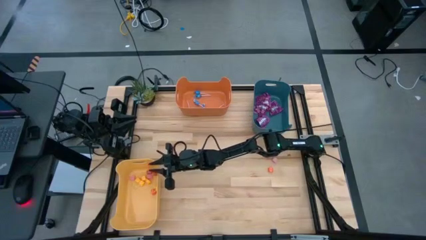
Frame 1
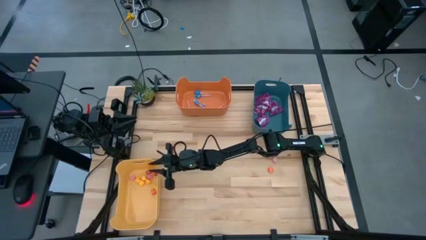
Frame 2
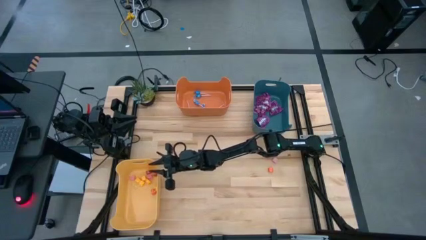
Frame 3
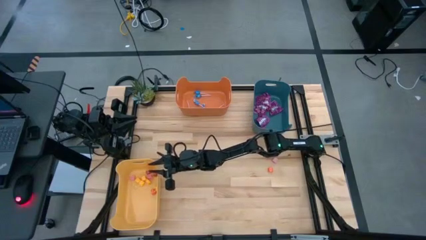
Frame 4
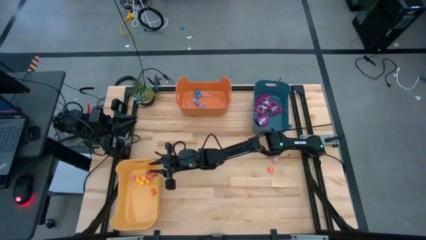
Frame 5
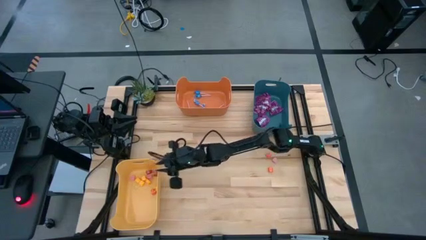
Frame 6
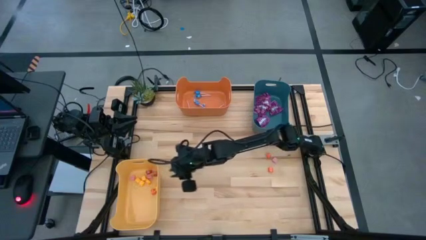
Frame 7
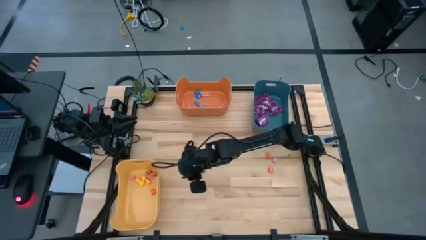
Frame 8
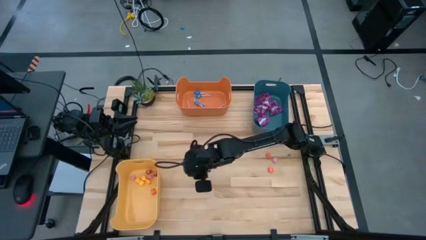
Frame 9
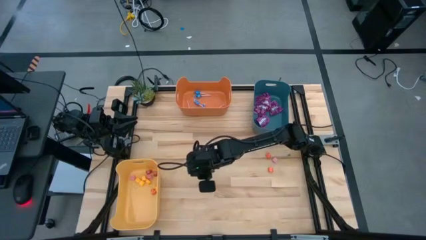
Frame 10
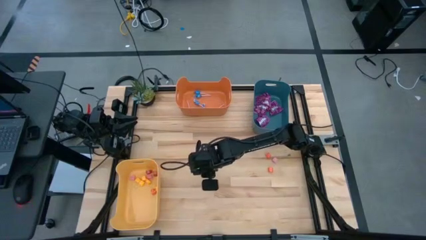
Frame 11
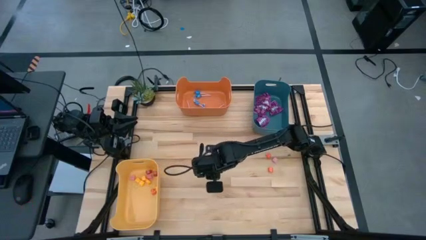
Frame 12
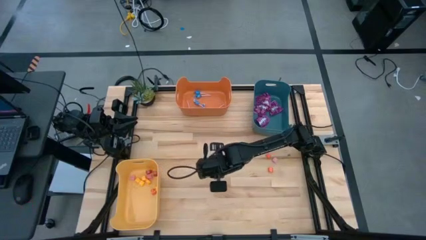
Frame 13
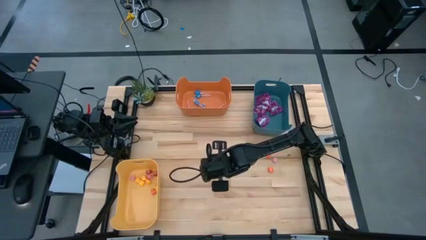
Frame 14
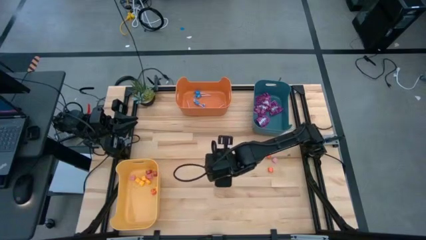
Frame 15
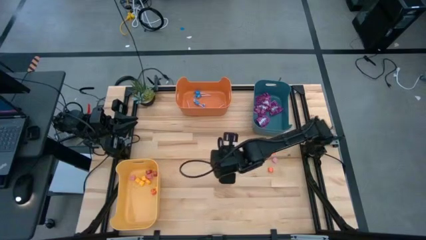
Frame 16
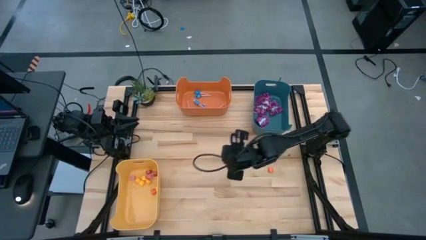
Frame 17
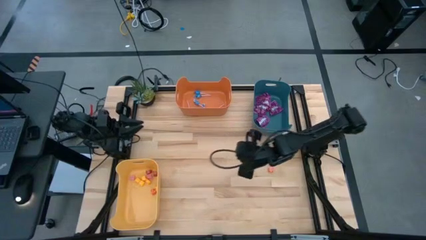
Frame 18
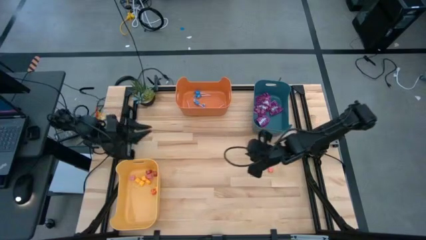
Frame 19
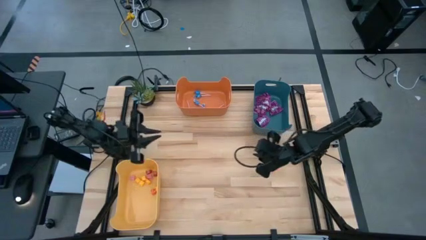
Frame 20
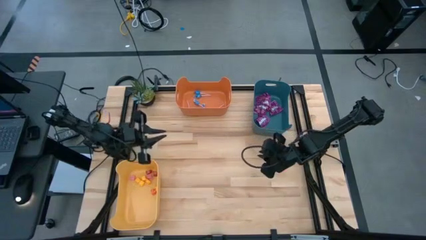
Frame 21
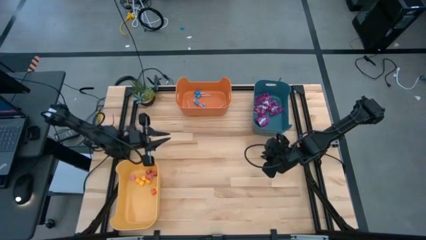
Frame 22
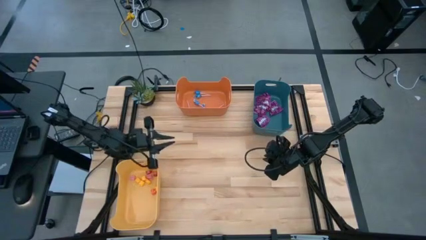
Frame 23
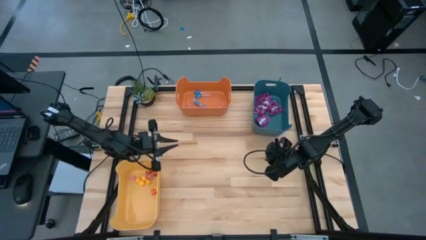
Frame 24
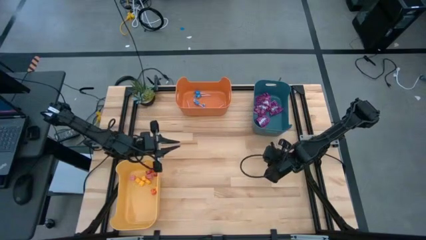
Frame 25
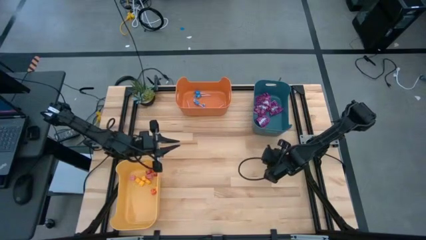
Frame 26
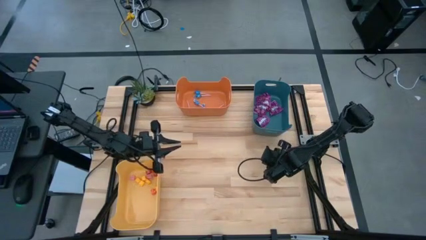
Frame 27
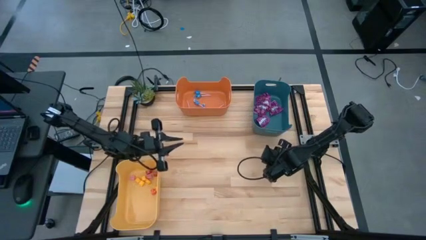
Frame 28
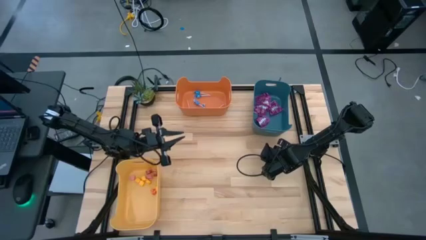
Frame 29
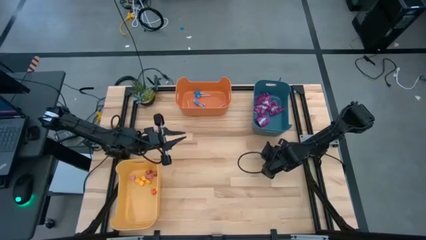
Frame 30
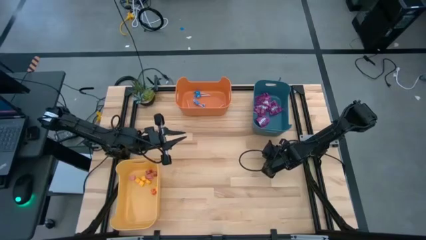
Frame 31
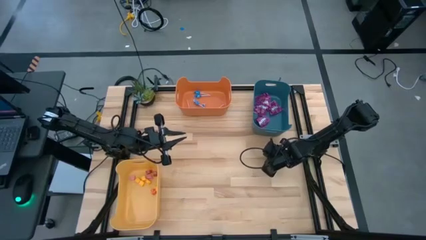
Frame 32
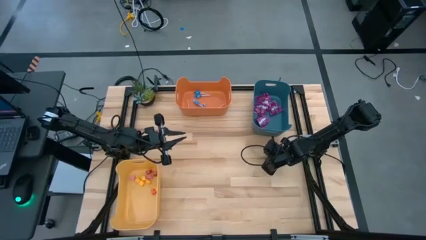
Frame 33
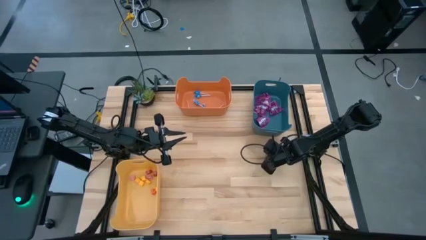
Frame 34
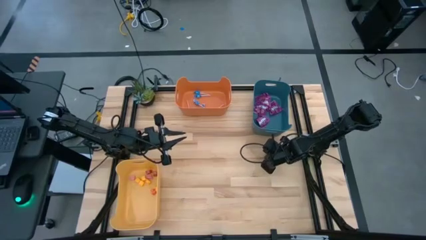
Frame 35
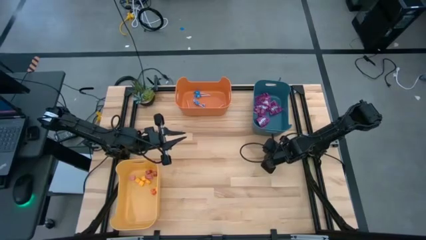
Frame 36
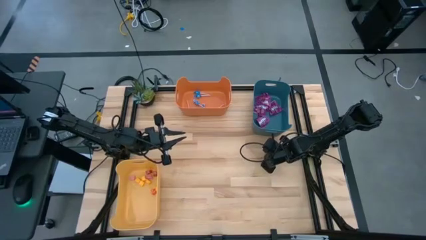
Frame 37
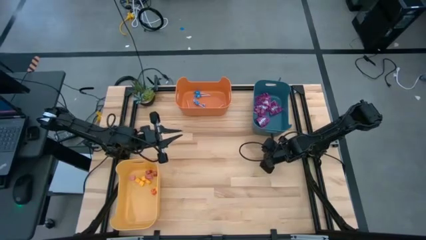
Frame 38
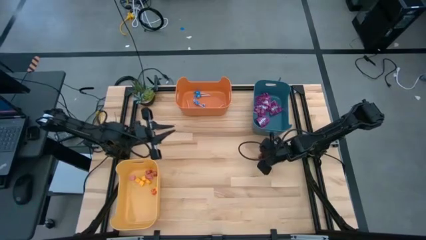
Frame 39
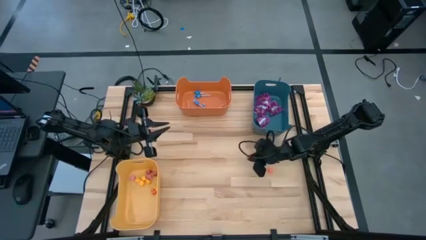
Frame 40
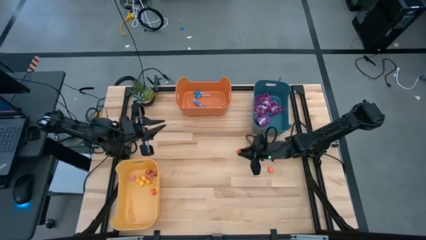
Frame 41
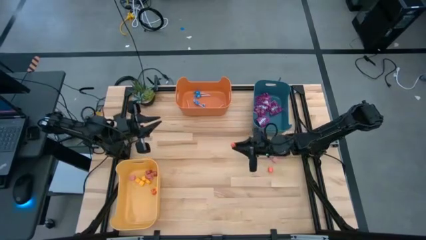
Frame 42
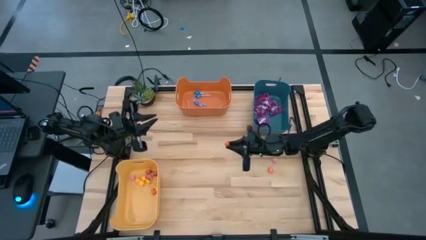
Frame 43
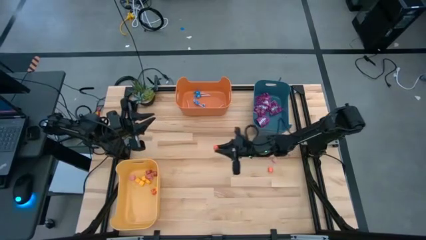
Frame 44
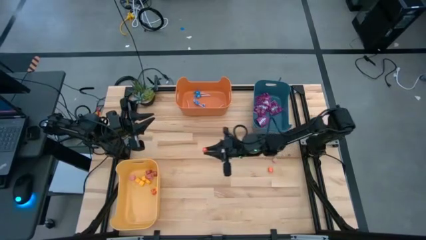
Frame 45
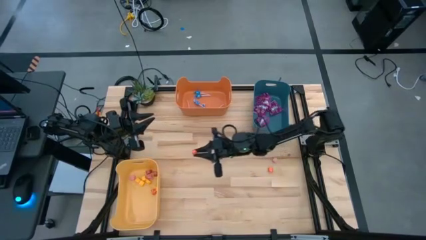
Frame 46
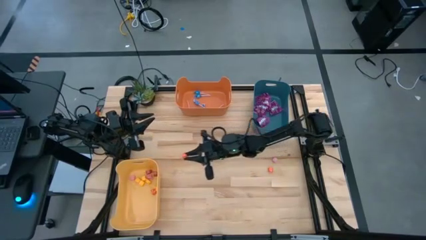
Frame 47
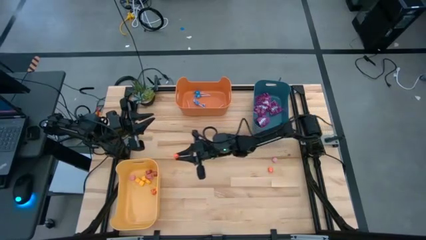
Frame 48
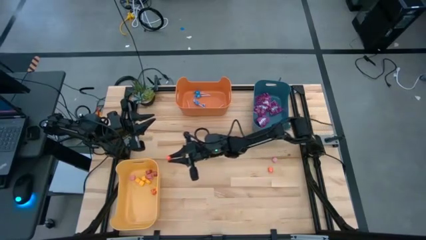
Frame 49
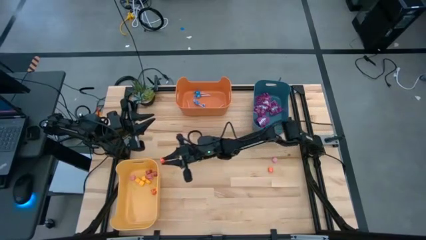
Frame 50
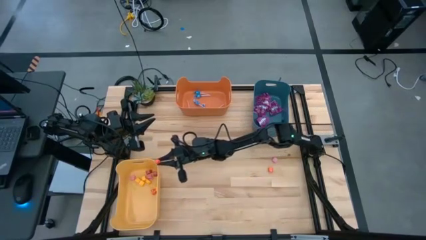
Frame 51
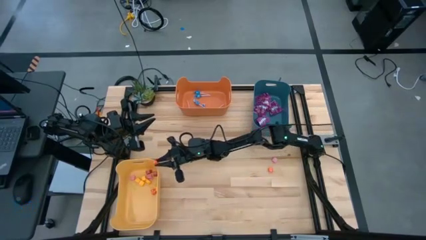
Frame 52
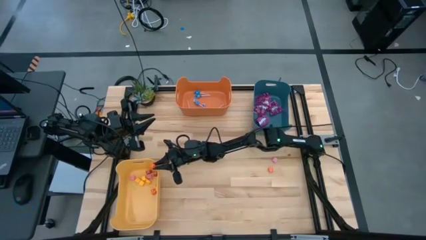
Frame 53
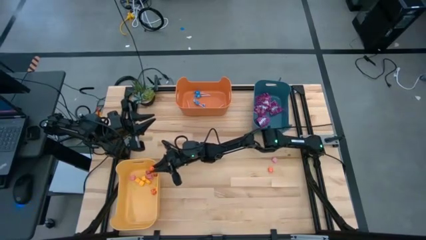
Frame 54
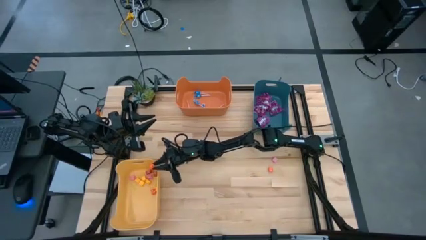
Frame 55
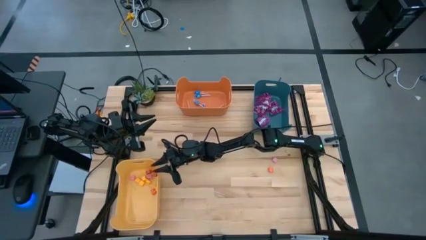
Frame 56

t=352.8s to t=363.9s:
Task: Sort candy
Put the top orange candy into the yellow bin
